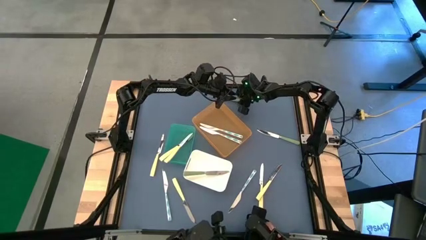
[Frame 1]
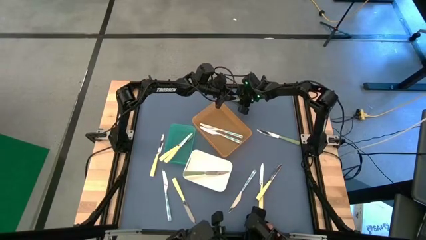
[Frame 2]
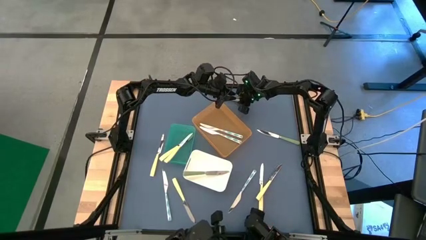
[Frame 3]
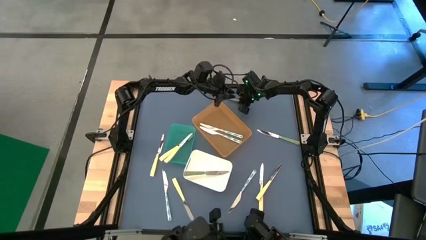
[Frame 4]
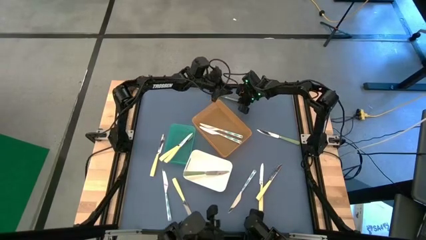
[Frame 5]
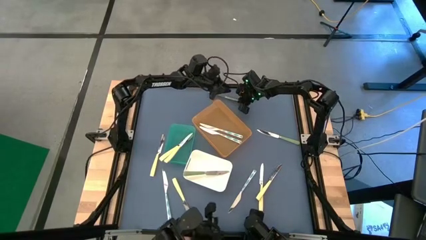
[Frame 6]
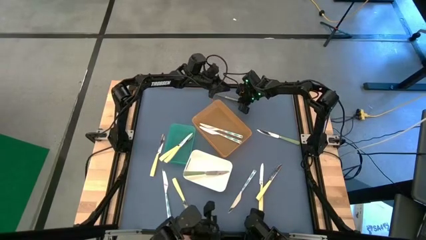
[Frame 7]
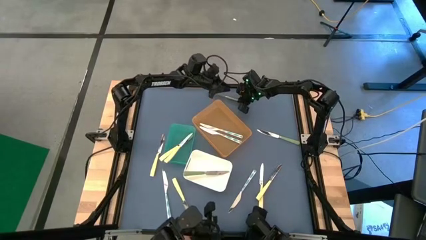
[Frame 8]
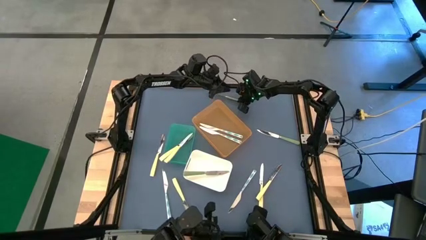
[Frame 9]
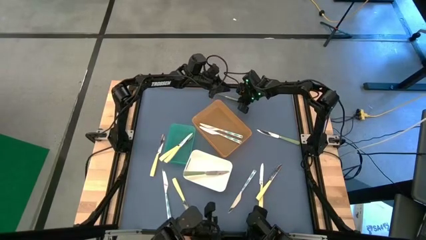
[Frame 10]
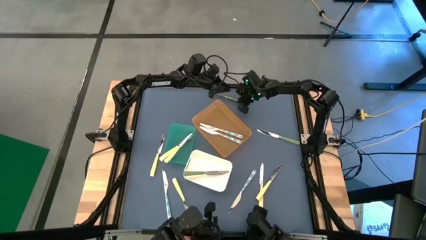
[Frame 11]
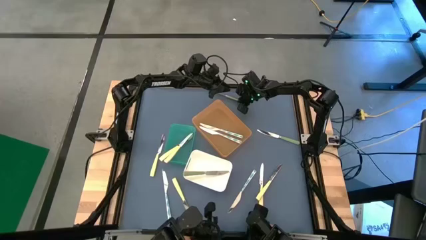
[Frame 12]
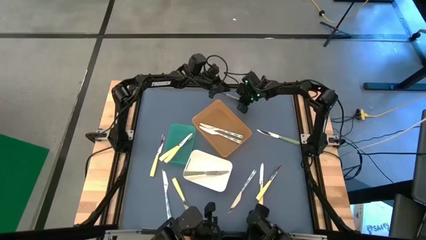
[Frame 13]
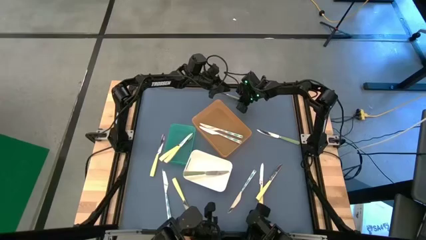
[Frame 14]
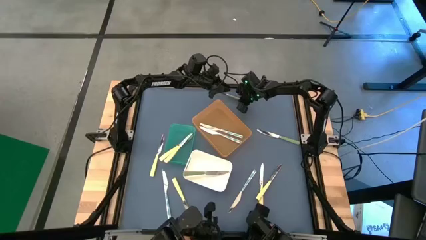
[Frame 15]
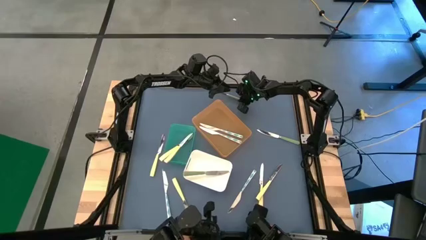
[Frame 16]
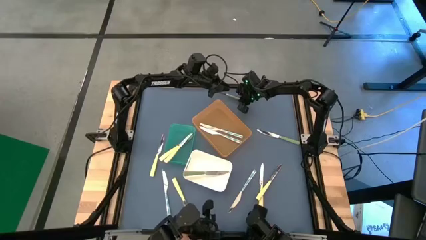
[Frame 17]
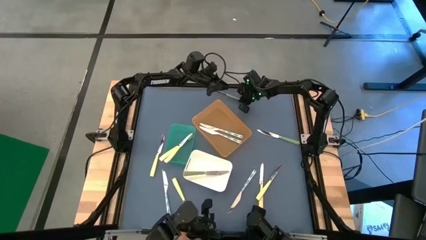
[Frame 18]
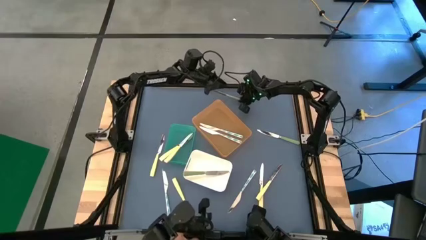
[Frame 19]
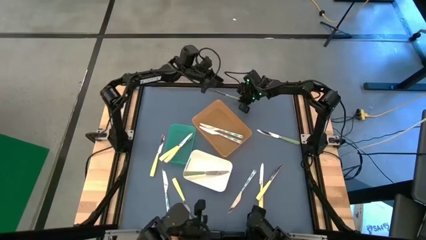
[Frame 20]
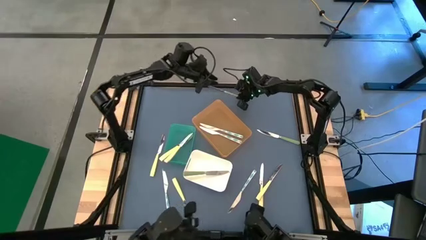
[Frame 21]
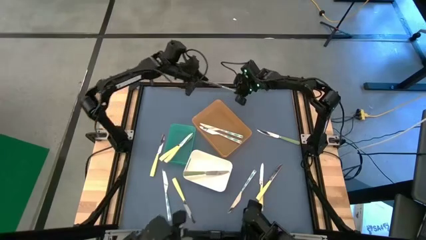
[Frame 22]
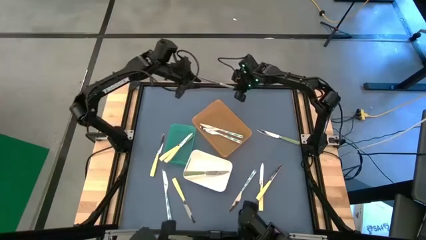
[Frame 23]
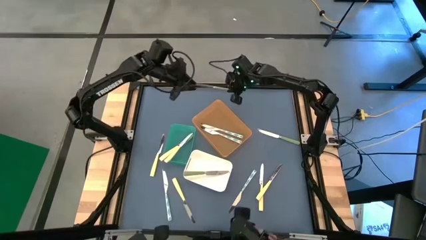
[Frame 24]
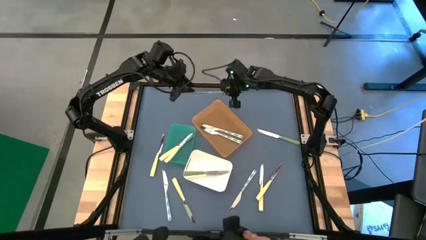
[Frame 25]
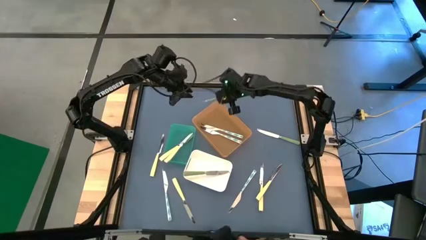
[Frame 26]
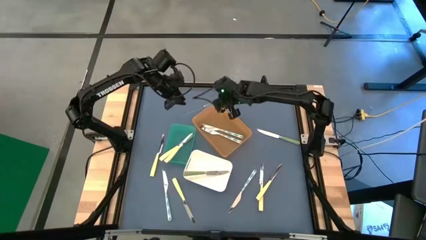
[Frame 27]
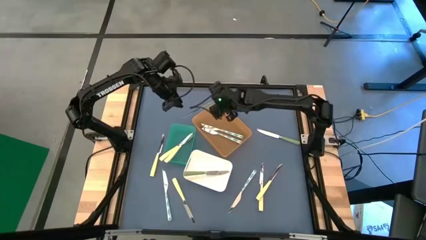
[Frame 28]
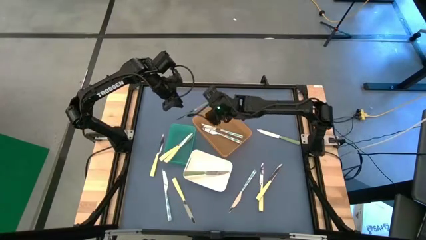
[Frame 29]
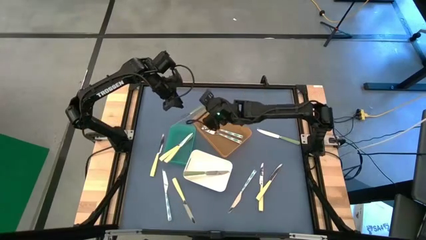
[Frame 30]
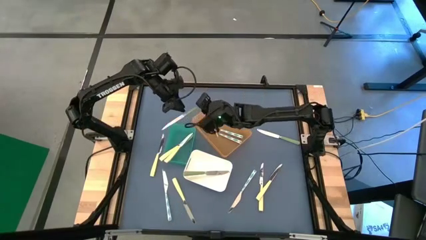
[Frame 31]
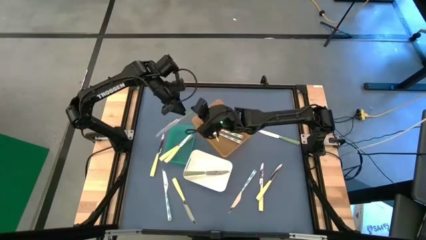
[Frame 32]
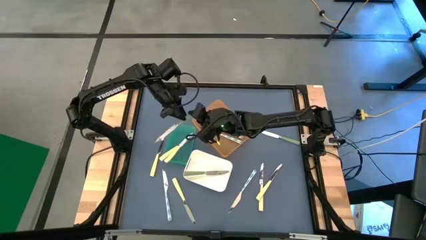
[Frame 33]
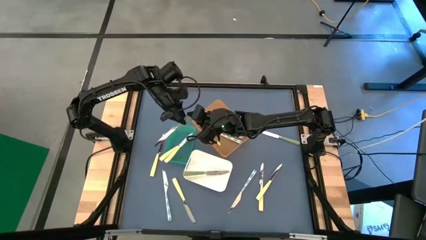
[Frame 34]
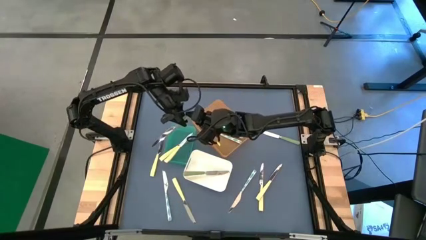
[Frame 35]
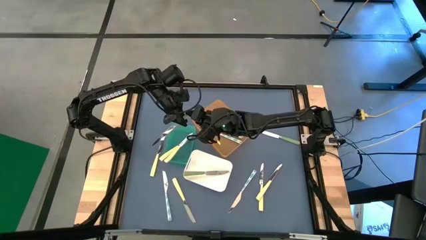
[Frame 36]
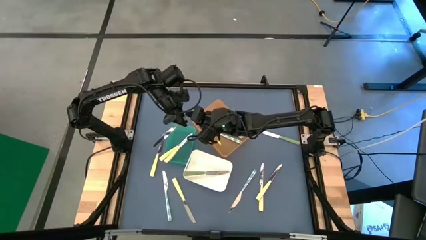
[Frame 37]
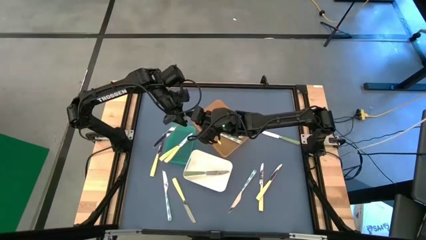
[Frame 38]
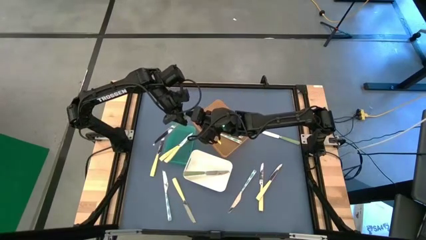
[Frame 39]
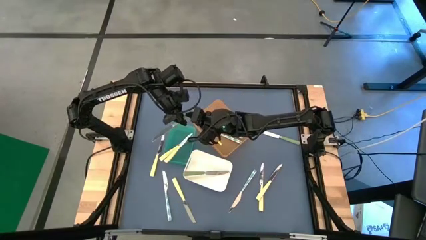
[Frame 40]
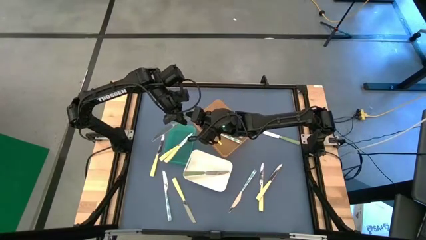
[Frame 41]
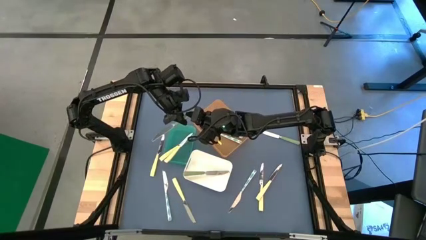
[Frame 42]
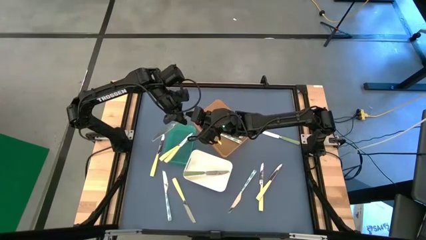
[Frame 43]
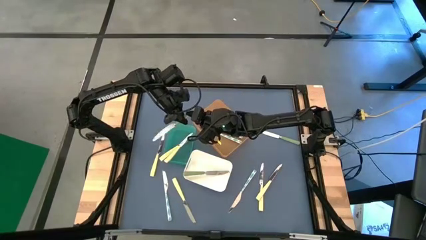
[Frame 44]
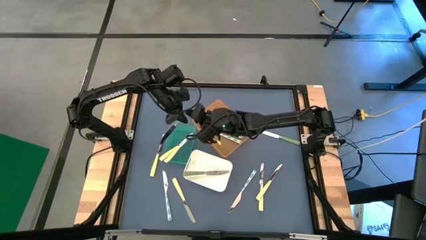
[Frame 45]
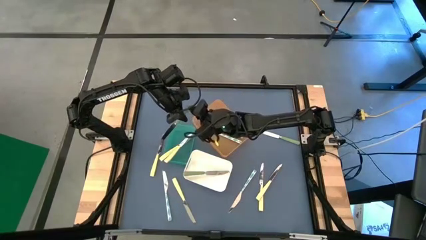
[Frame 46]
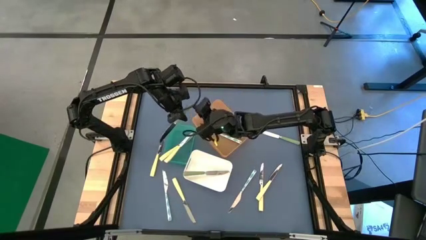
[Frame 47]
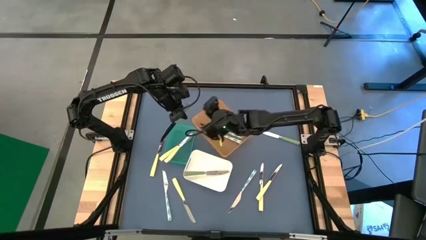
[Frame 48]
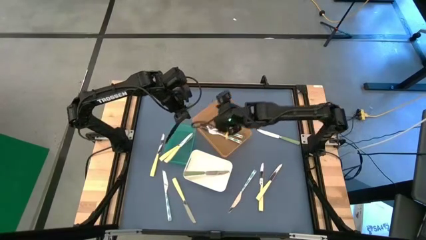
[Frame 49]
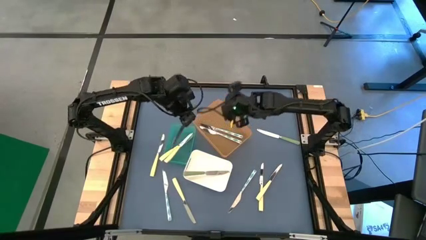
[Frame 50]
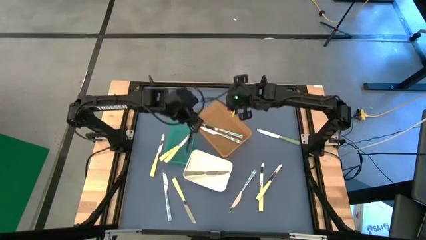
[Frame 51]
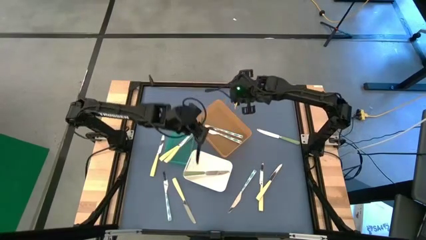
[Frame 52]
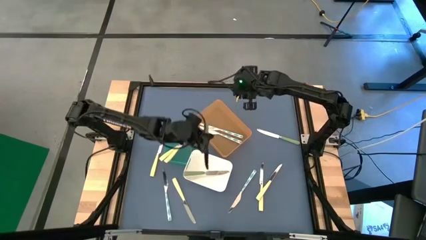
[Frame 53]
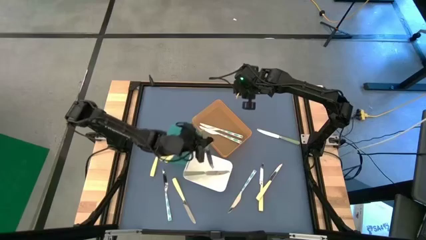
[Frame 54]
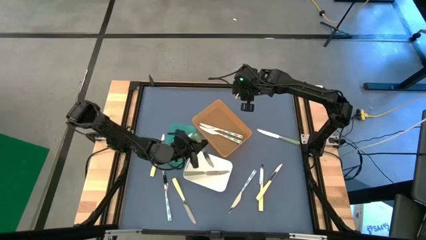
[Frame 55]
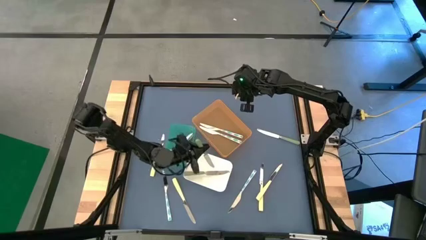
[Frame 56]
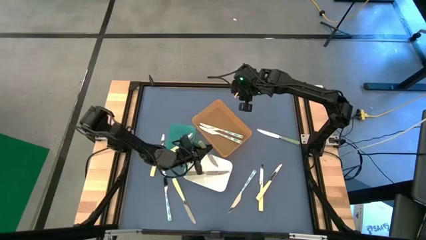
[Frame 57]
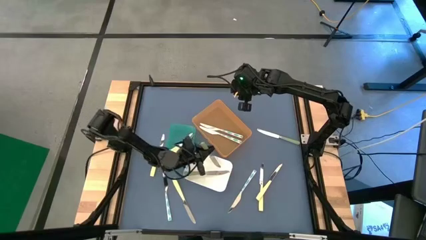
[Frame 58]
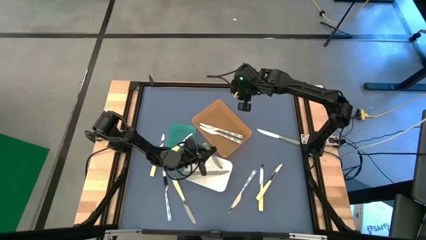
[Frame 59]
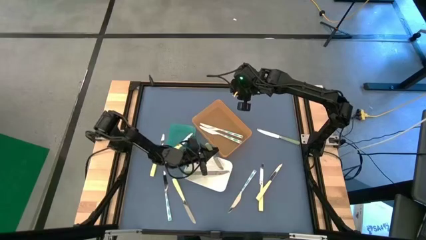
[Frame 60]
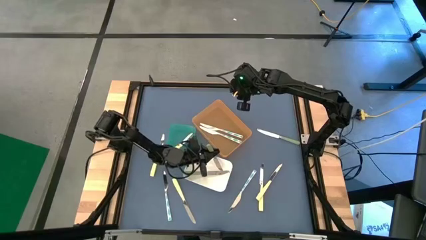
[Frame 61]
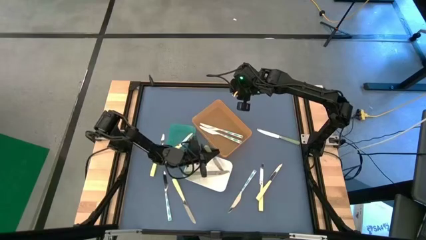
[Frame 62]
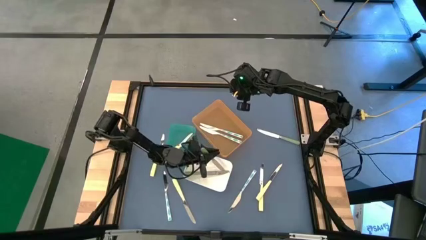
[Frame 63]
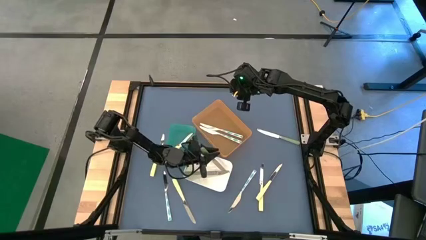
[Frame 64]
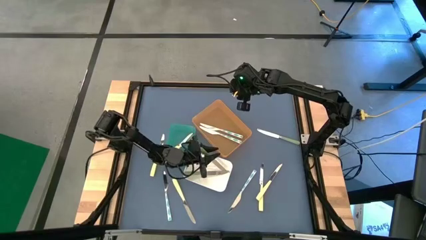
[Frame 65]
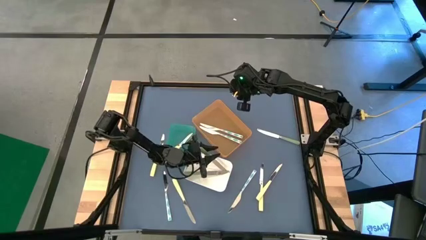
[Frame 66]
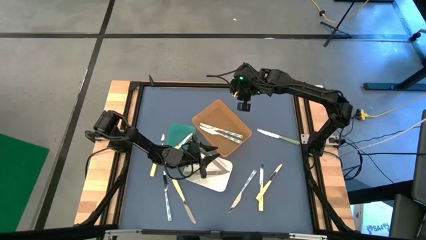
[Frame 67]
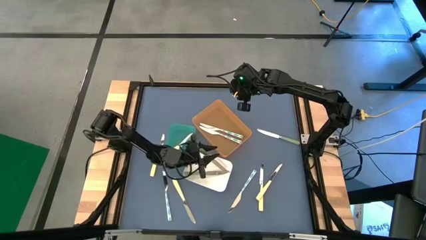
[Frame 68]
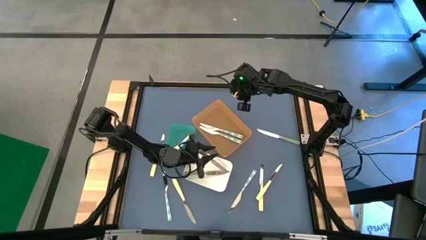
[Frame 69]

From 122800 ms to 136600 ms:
Task: Sort silverware by color (type)
Put the green table knife into the white bin

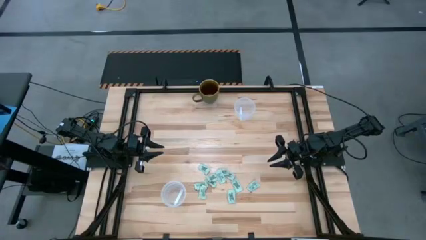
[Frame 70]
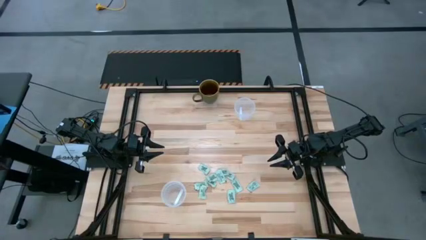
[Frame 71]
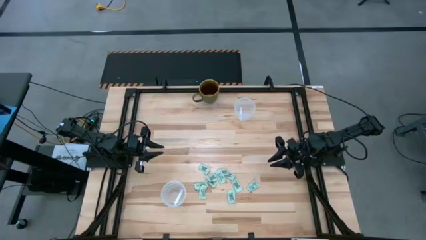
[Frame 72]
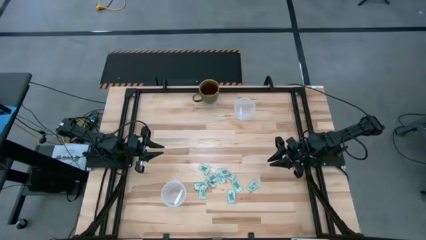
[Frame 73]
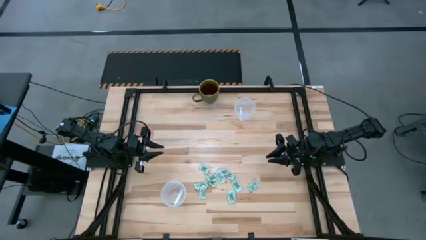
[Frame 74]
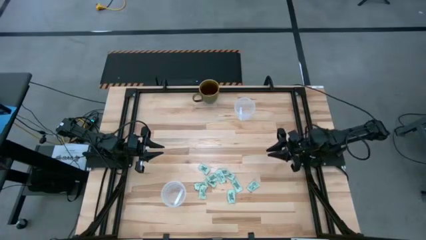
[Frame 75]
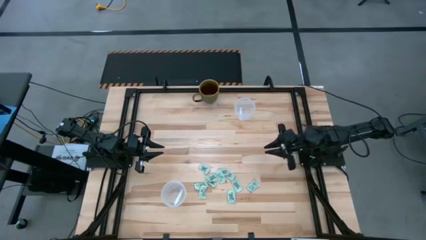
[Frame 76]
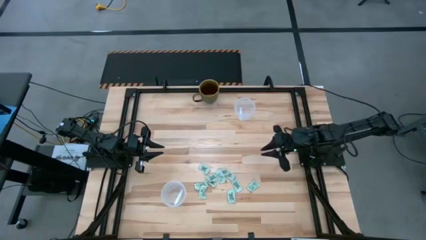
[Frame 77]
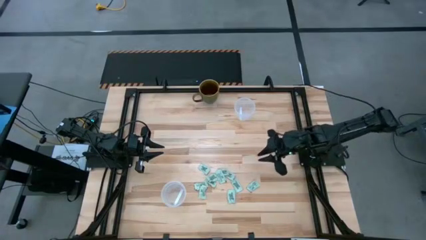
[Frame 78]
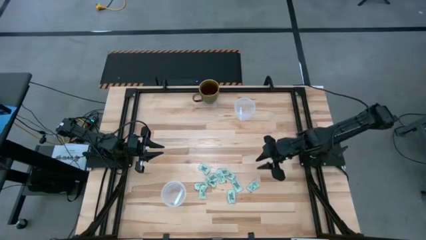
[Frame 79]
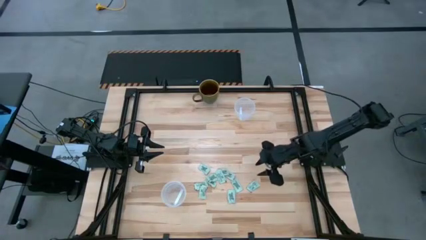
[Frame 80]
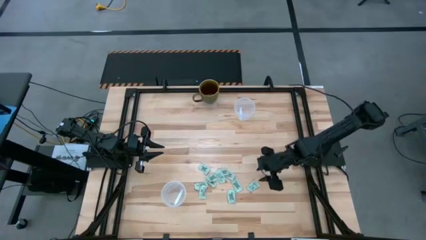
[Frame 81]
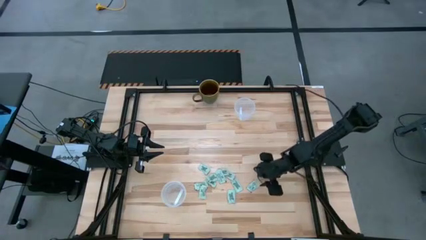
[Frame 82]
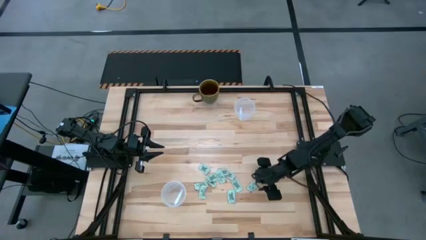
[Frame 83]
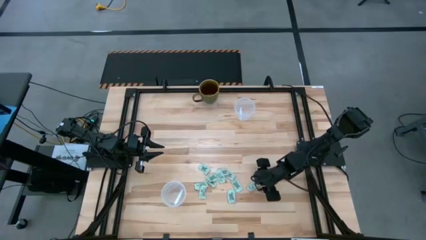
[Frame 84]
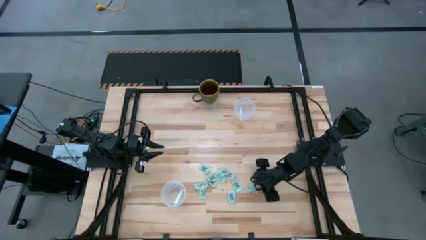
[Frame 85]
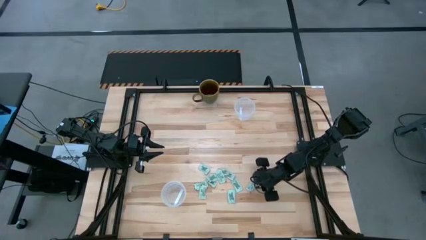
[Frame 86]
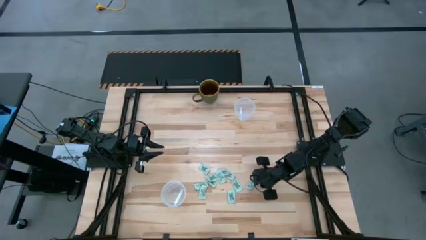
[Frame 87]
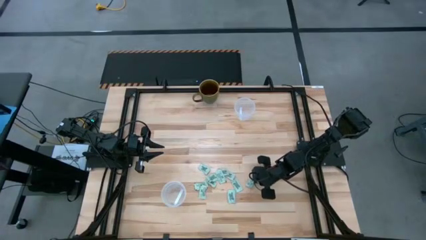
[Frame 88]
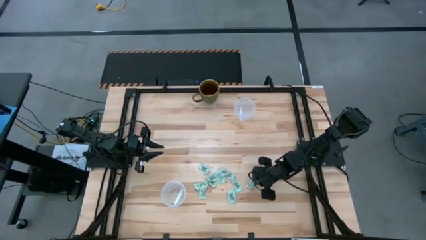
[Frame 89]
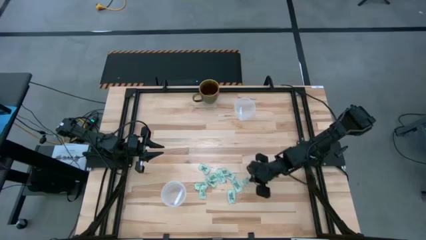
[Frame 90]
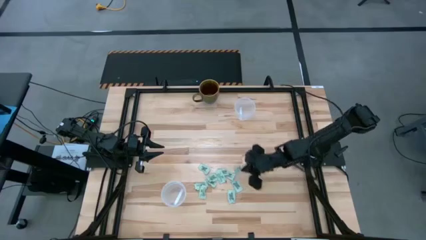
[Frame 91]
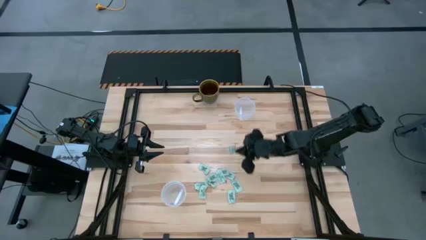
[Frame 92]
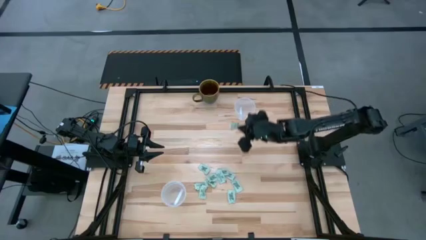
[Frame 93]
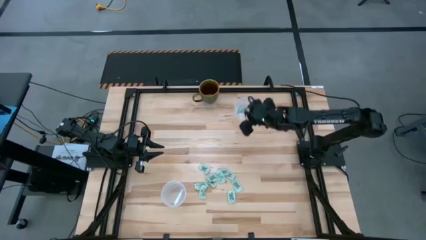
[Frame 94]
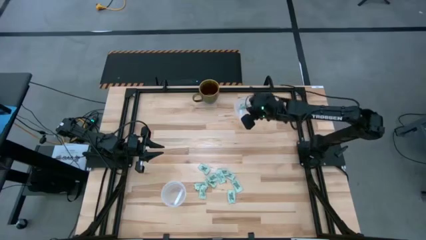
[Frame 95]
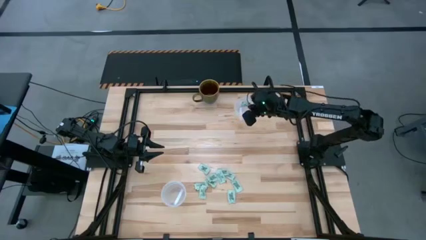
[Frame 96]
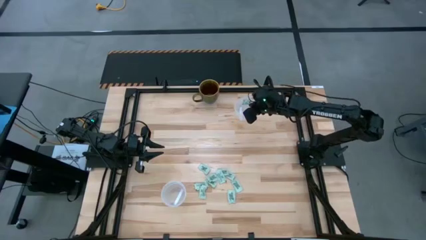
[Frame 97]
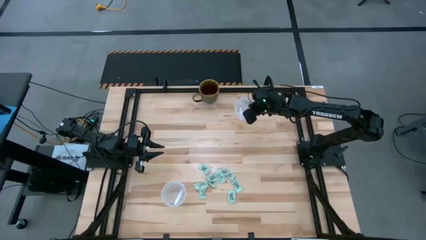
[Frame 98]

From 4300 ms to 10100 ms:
Task: Pick and place items into bin
Put the stevia packet into the top transparent bin
